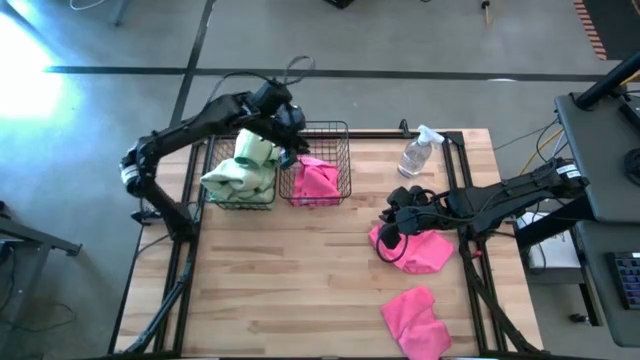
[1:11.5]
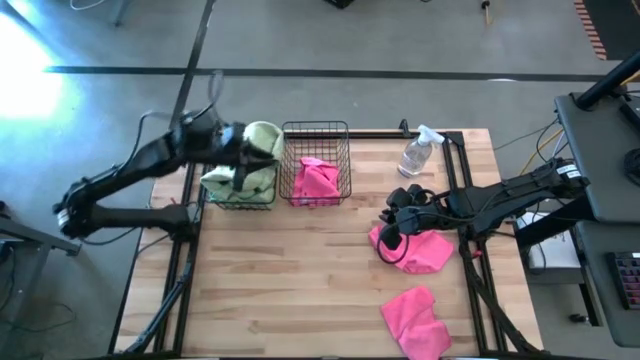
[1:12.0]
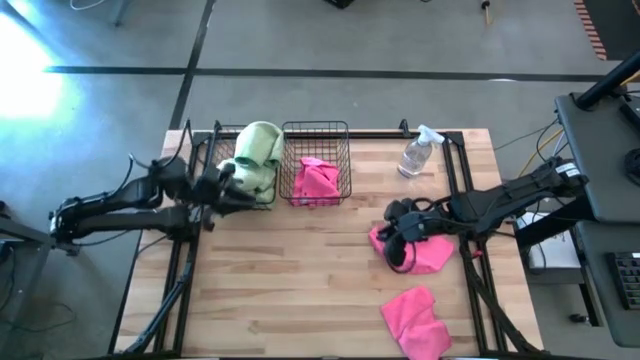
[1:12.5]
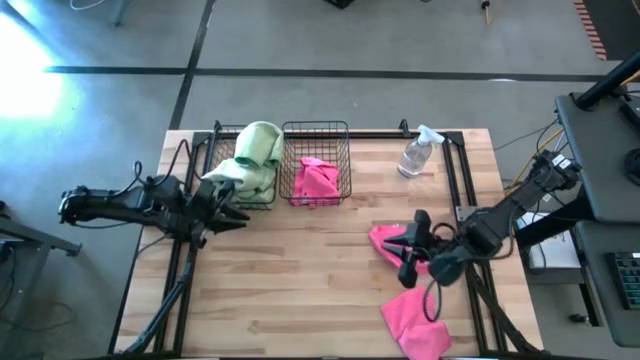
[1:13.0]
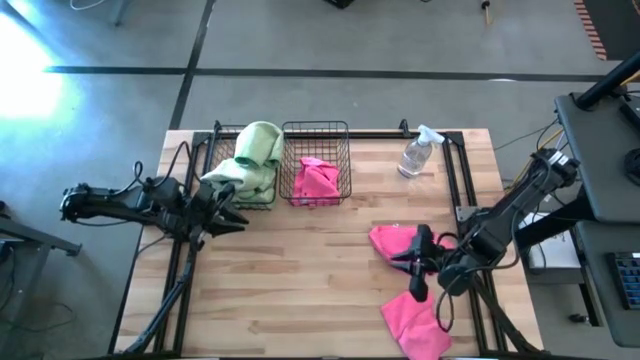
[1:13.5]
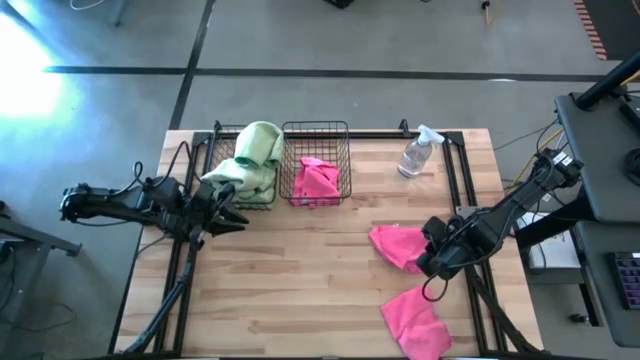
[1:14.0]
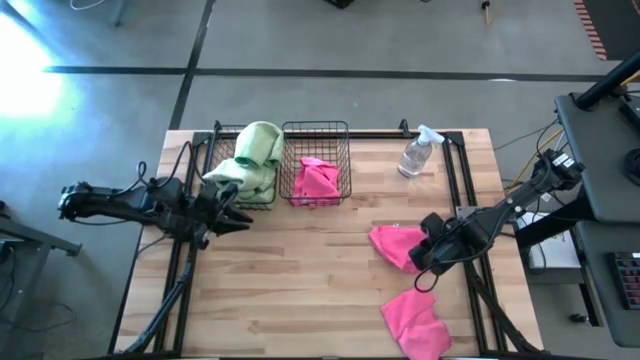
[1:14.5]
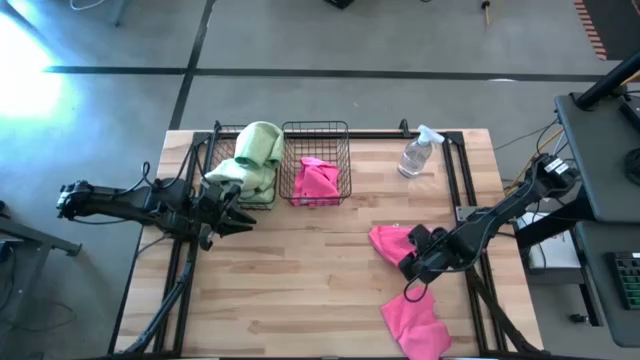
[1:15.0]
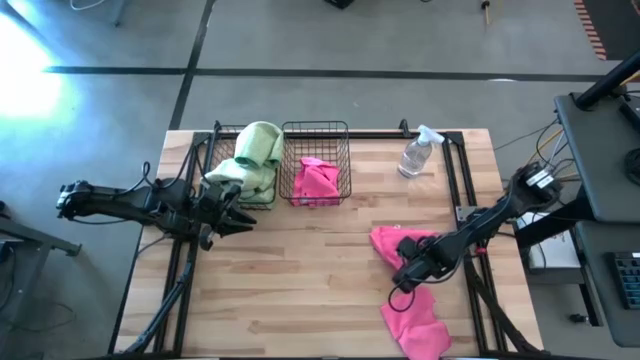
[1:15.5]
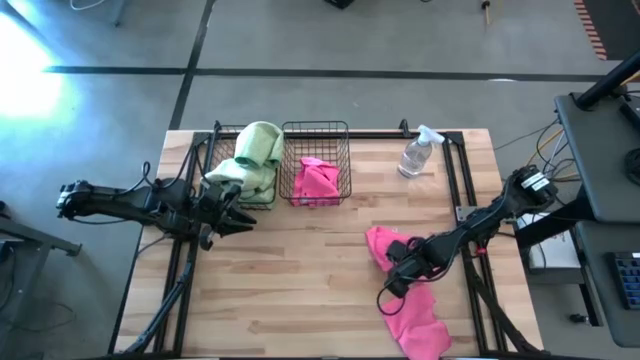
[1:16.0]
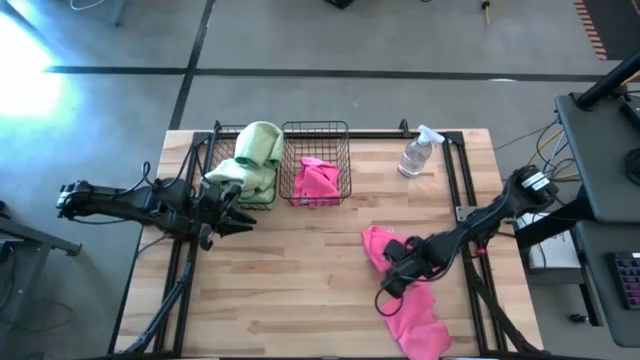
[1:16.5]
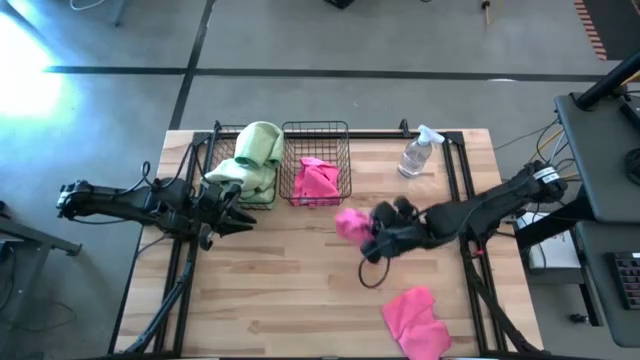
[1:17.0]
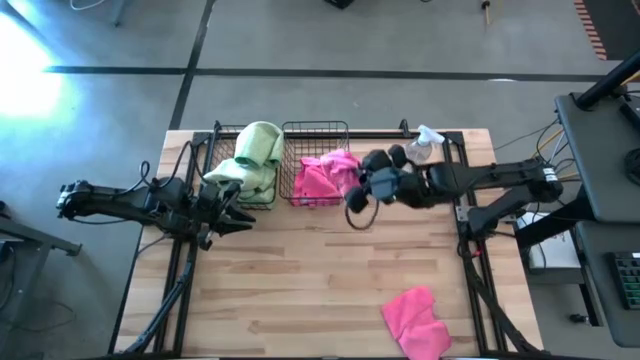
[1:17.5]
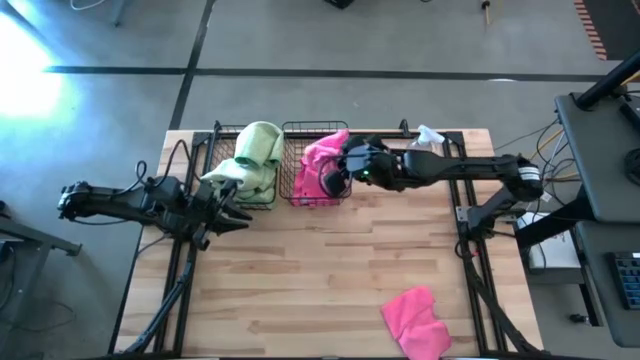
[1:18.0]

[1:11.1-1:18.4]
Task: Sort microfiber towel by color & place in baskets
Put the pink microfiber cloth into the right wire basket

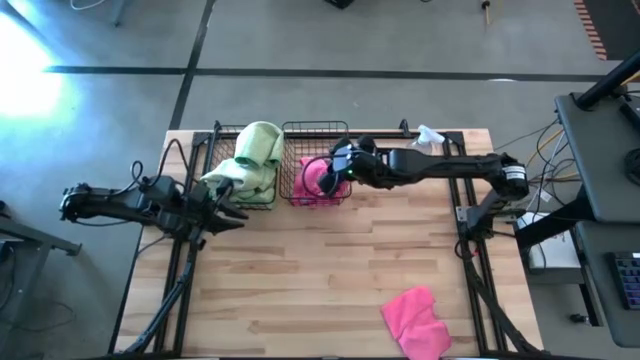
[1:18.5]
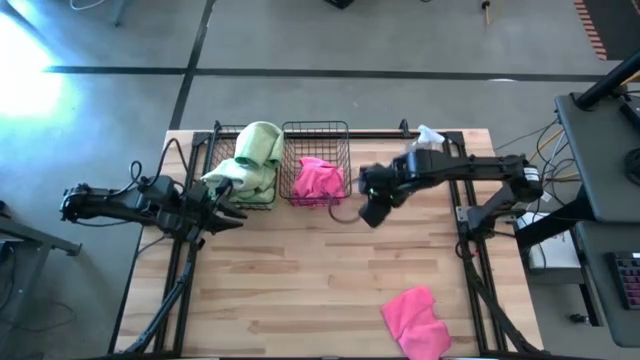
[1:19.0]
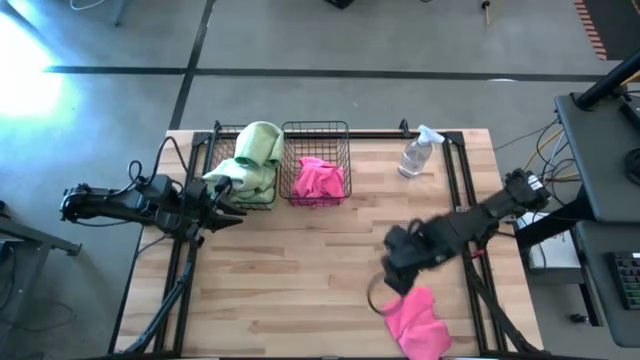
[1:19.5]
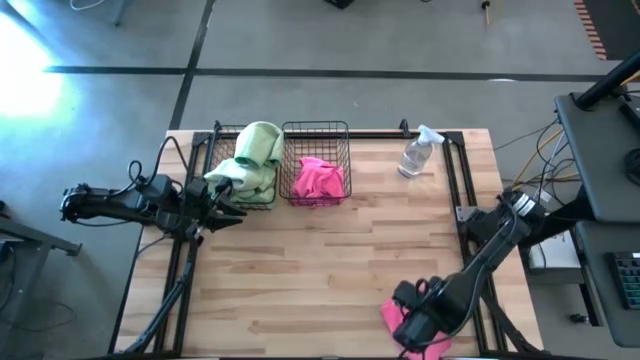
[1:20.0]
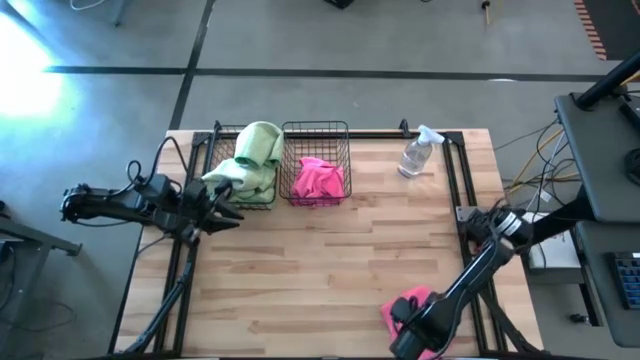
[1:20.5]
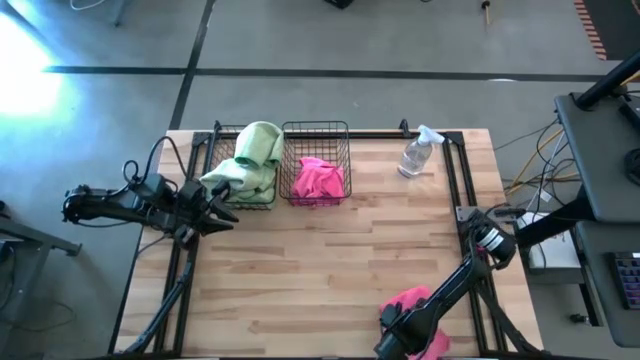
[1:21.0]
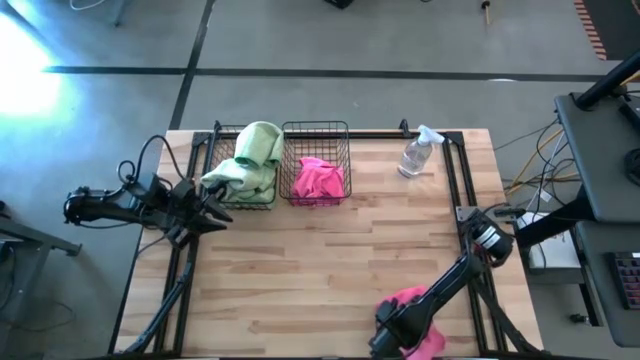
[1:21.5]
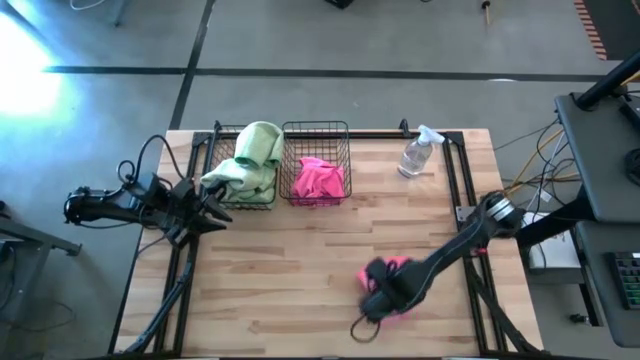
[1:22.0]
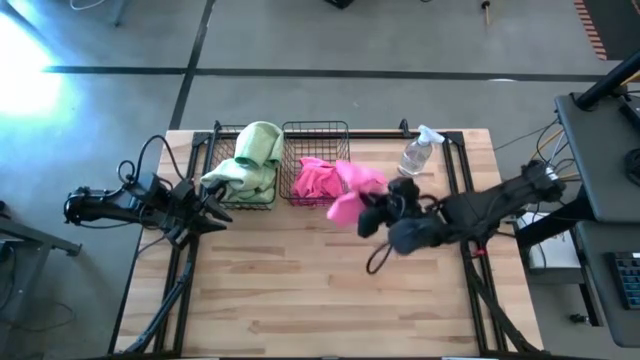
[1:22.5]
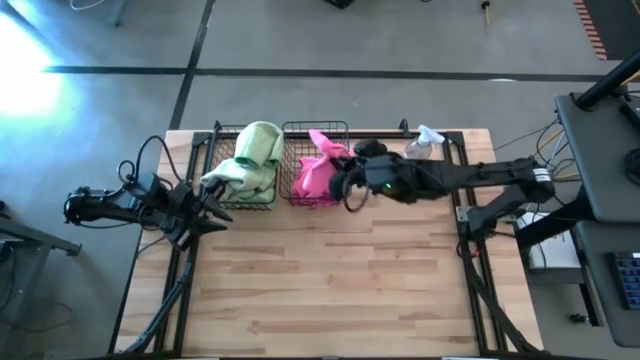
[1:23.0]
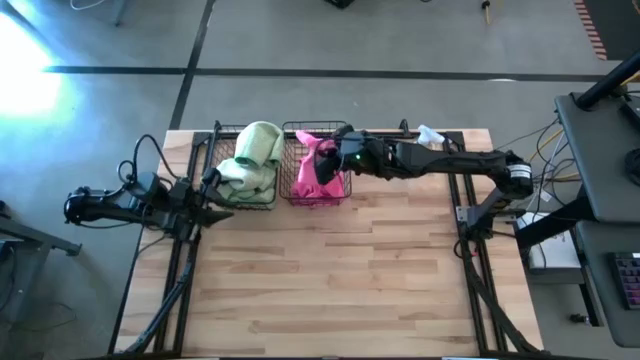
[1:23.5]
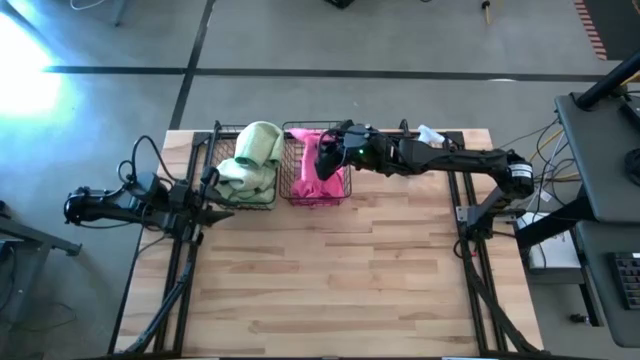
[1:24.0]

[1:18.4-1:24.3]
Put the pink microfiber cloth into the right wire basket

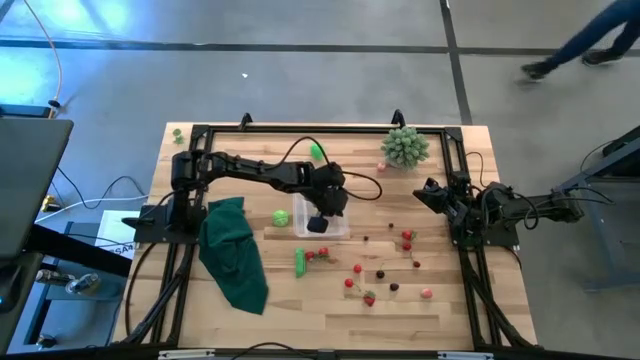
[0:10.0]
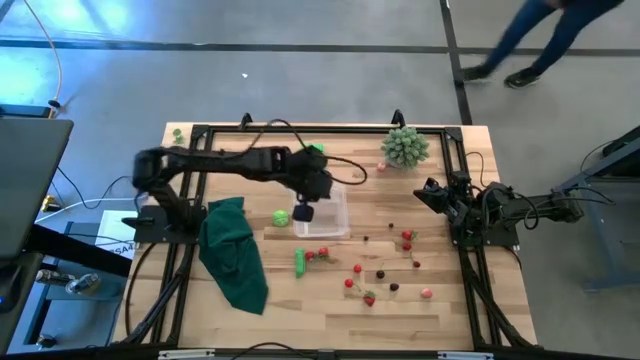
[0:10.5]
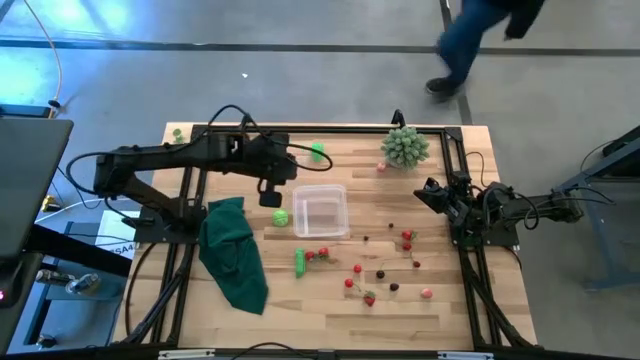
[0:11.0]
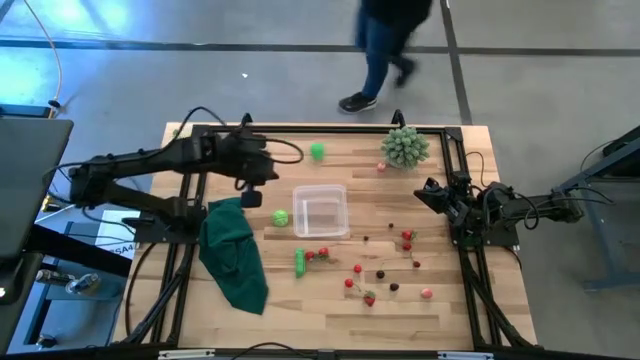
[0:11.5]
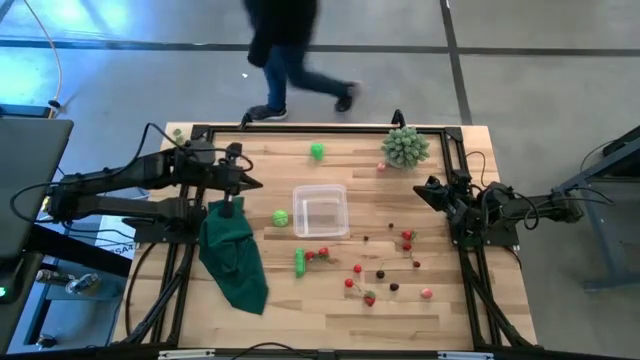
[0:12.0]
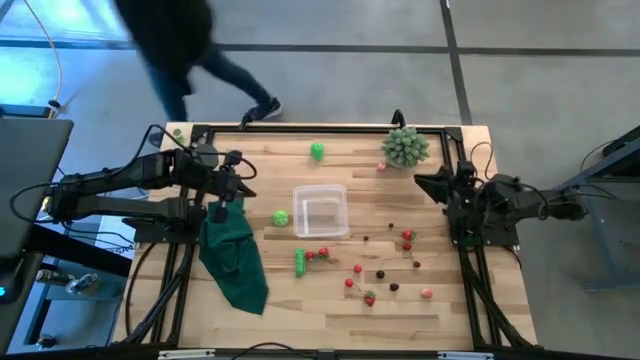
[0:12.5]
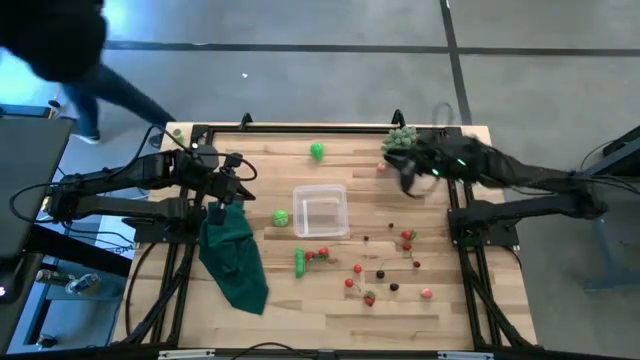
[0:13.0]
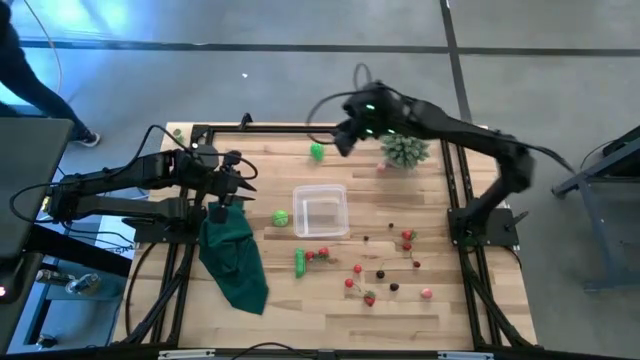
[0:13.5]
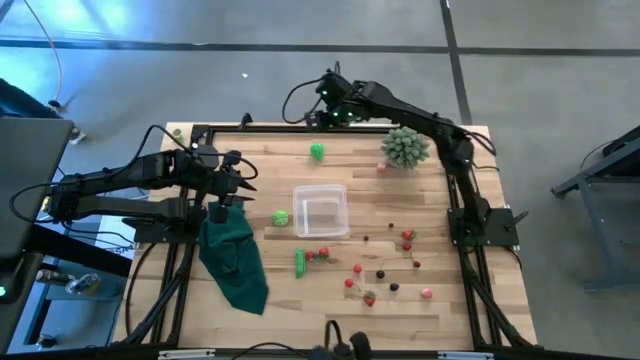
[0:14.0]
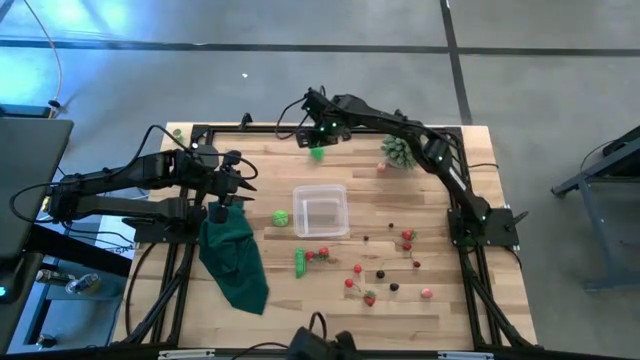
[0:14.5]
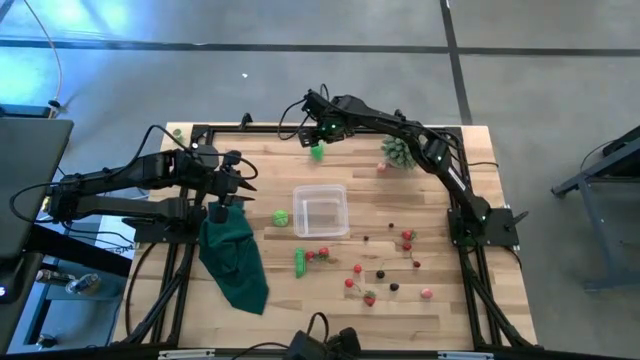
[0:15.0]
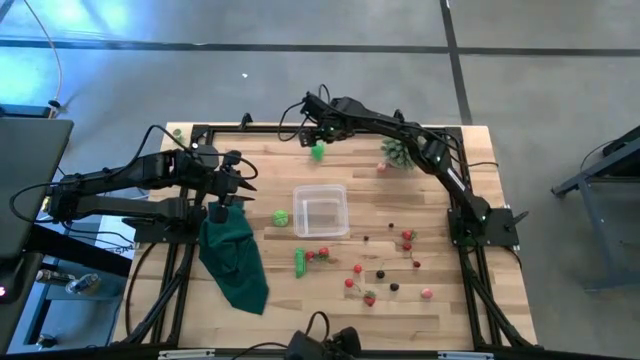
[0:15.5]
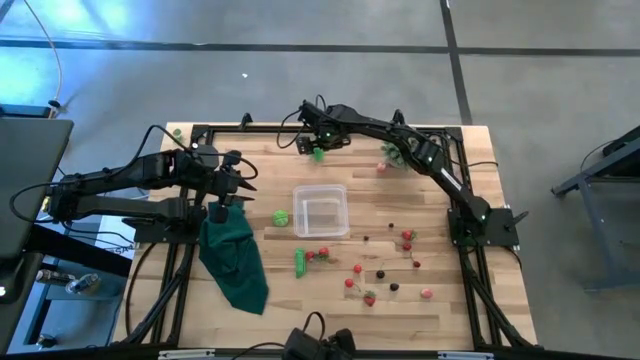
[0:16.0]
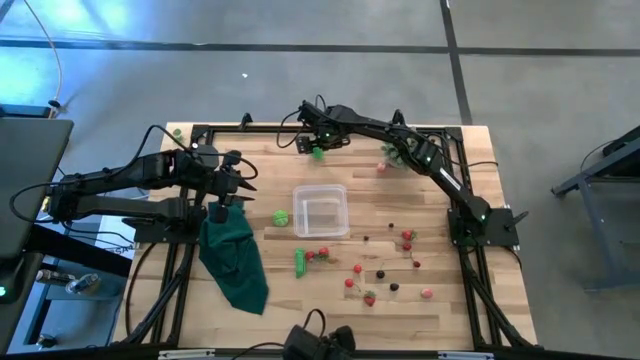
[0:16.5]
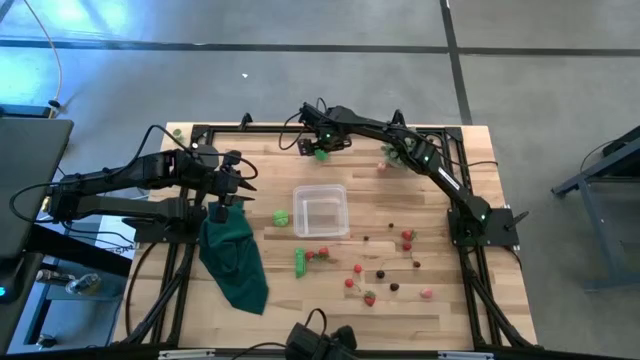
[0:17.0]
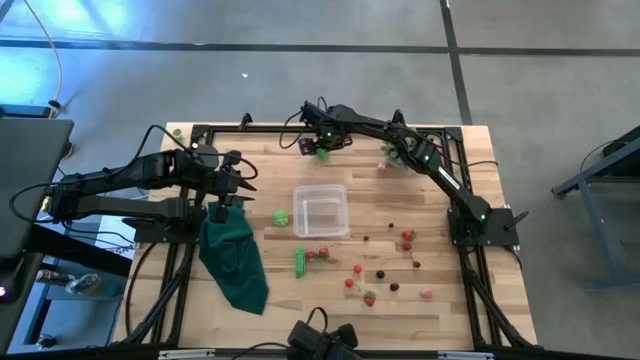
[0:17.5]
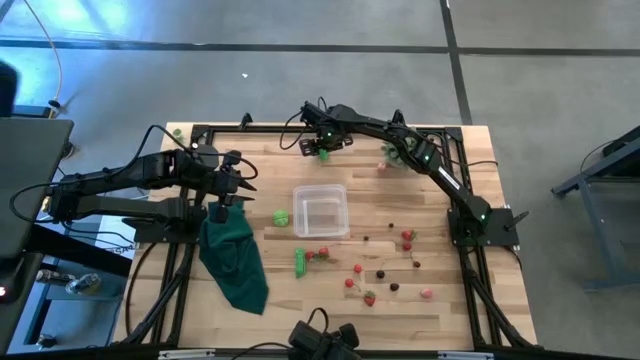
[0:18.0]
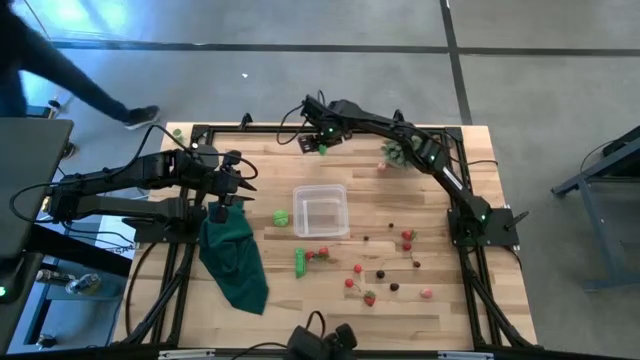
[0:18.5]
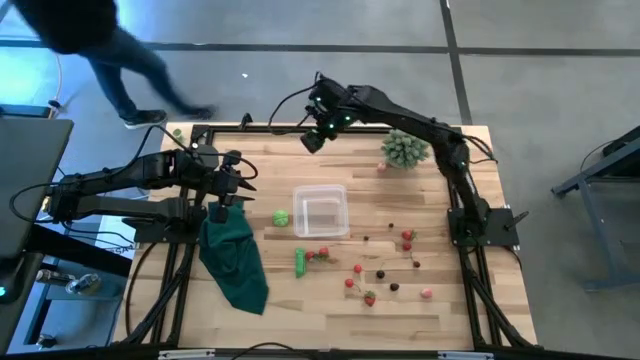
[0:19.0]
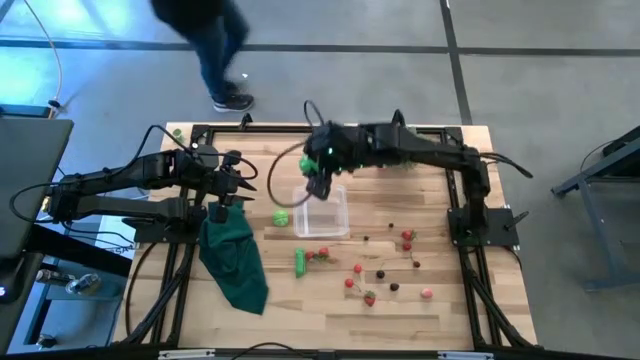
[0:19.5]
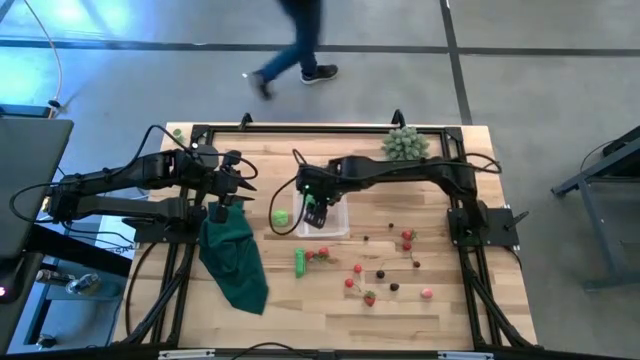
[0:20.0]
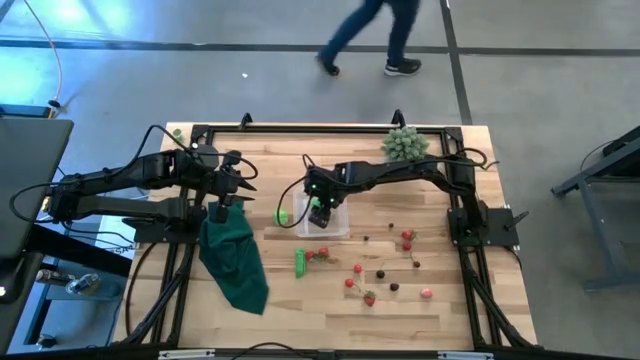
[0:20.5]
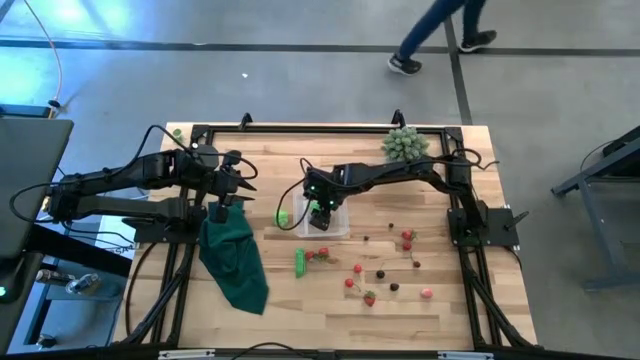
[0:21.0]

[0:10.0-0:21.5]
Task: Pick and placing Produce into tupperware
Put the avocado into the transparent bin
